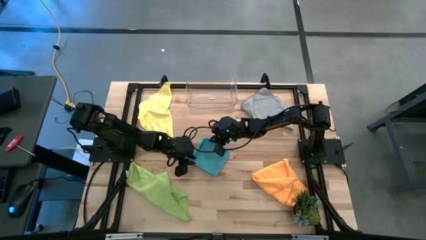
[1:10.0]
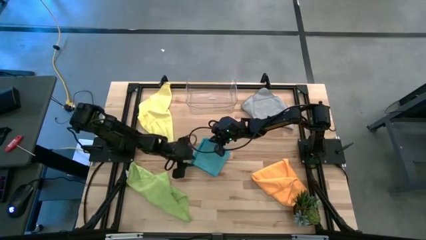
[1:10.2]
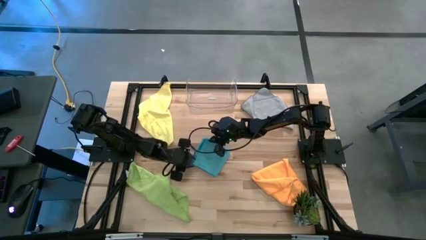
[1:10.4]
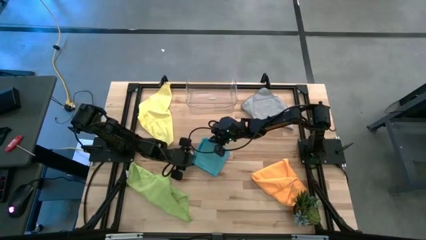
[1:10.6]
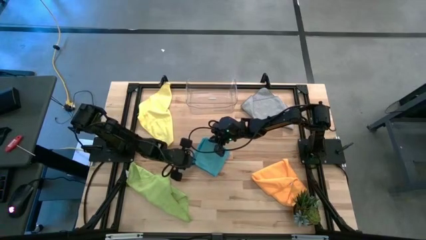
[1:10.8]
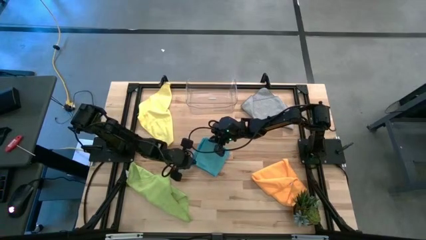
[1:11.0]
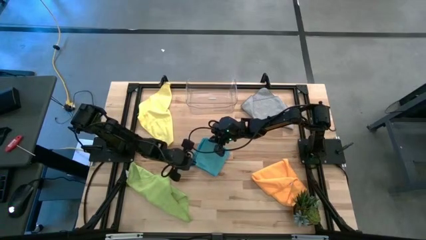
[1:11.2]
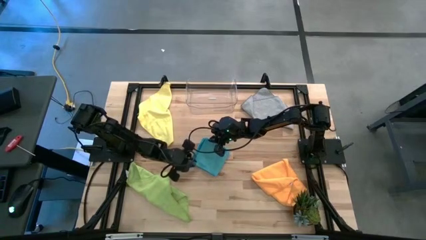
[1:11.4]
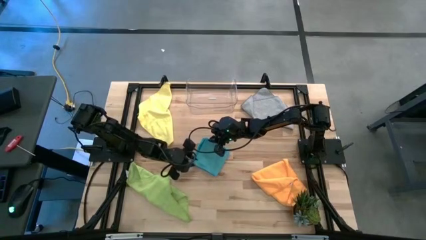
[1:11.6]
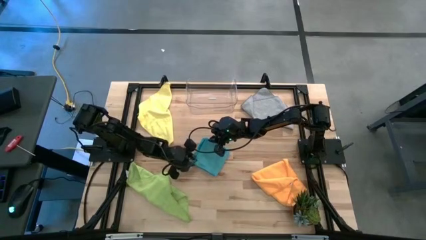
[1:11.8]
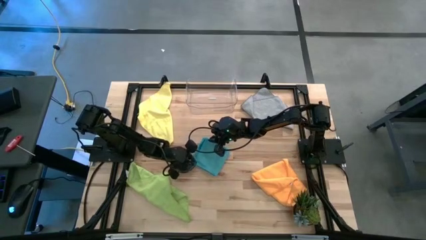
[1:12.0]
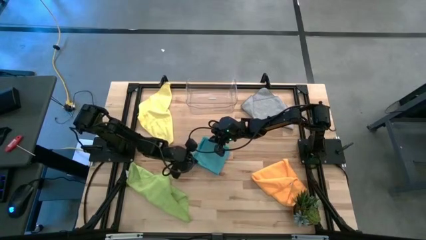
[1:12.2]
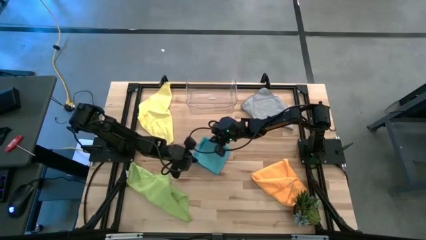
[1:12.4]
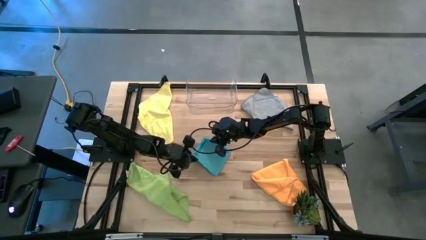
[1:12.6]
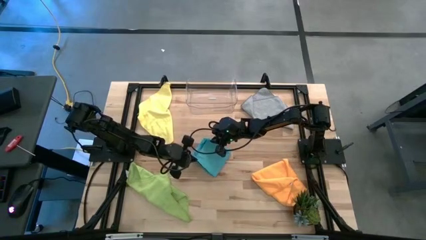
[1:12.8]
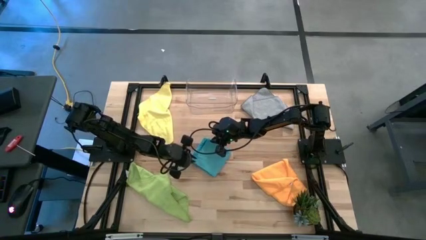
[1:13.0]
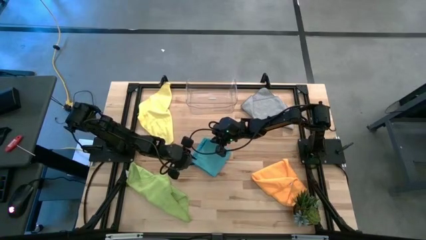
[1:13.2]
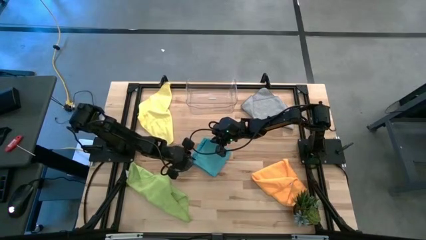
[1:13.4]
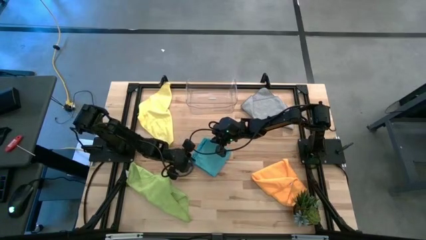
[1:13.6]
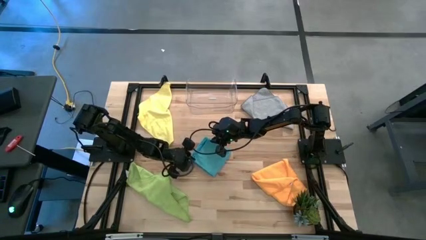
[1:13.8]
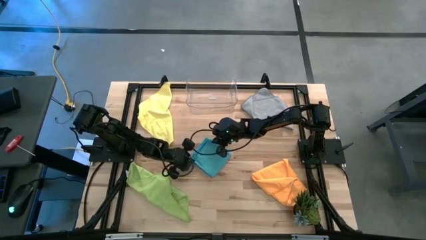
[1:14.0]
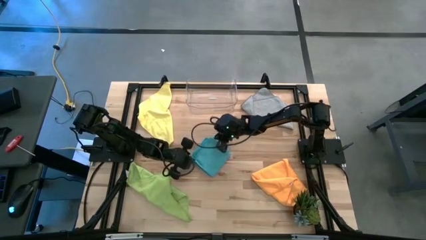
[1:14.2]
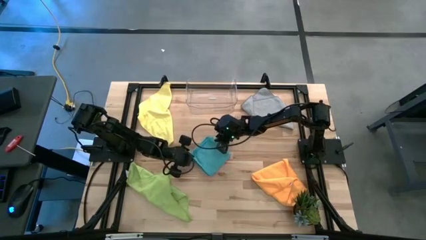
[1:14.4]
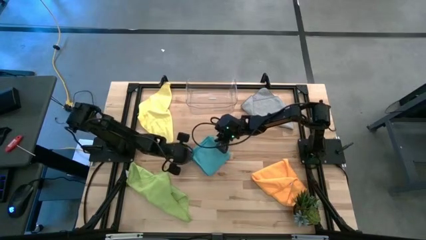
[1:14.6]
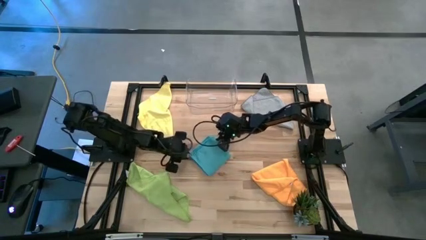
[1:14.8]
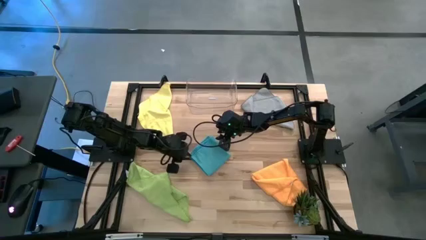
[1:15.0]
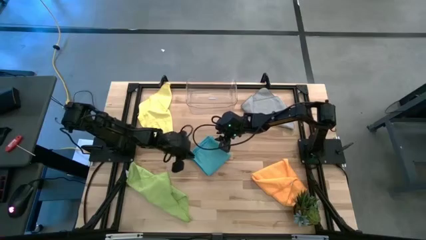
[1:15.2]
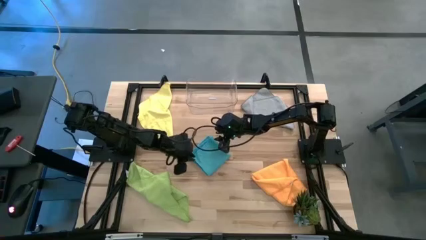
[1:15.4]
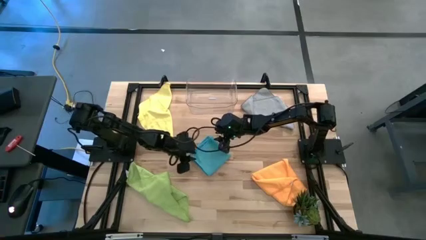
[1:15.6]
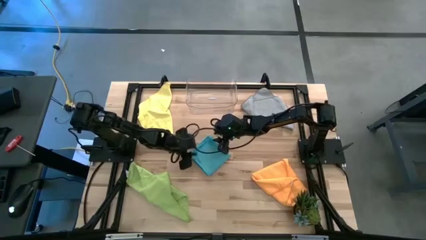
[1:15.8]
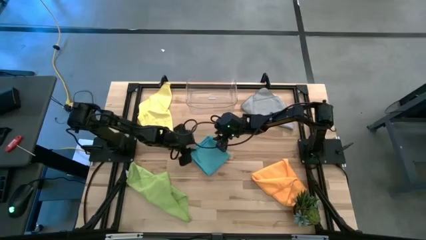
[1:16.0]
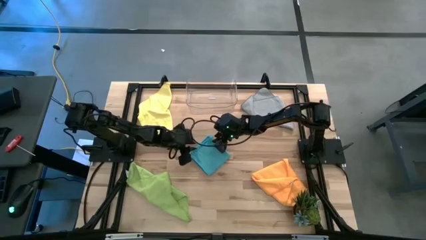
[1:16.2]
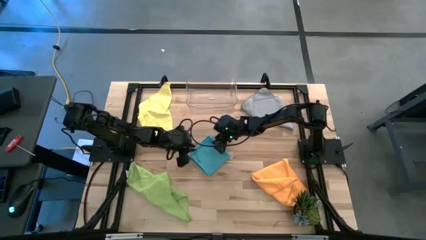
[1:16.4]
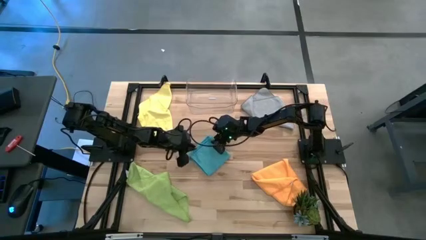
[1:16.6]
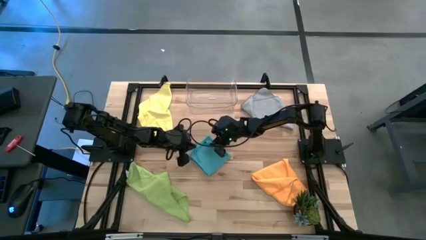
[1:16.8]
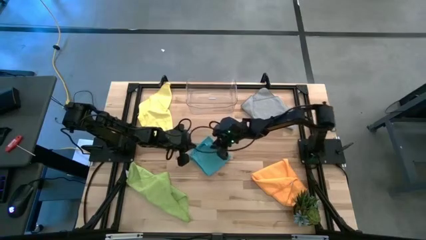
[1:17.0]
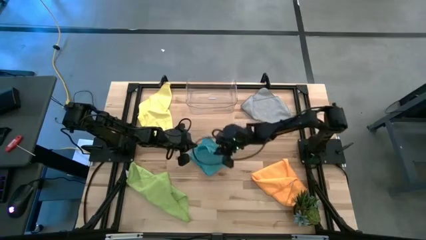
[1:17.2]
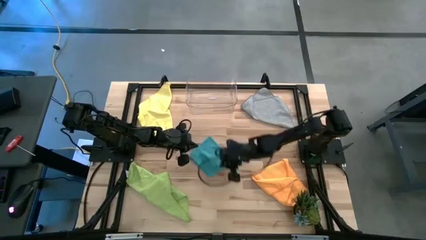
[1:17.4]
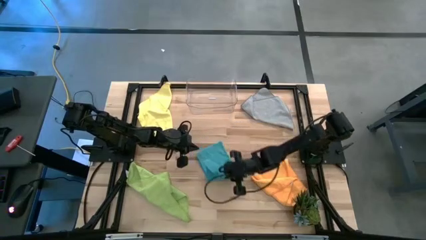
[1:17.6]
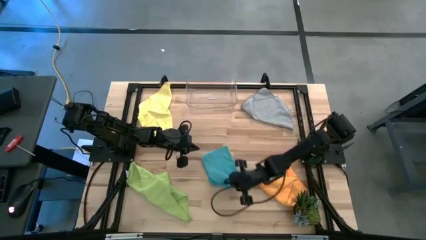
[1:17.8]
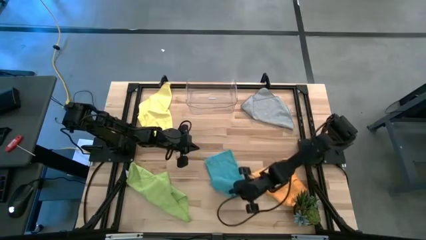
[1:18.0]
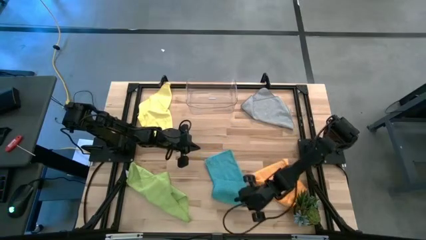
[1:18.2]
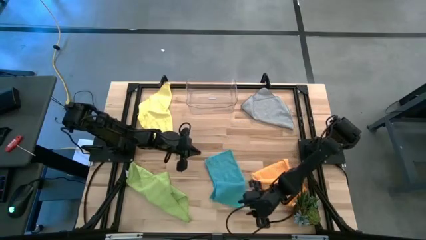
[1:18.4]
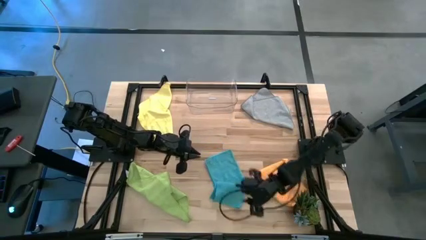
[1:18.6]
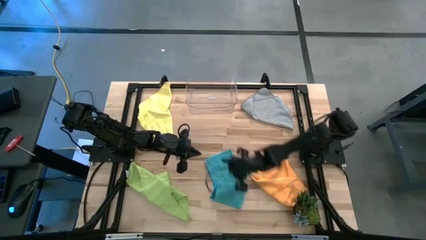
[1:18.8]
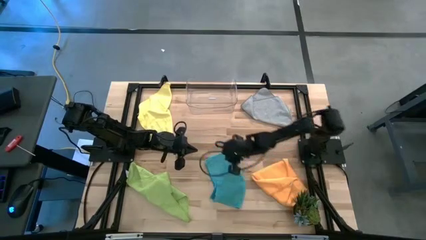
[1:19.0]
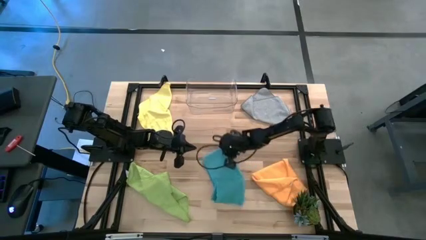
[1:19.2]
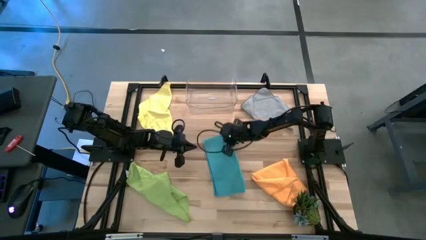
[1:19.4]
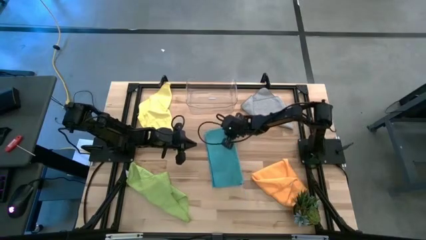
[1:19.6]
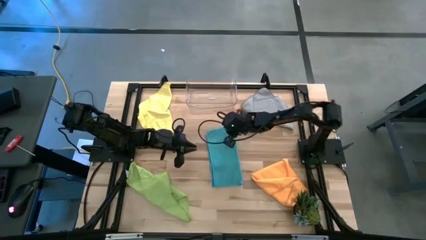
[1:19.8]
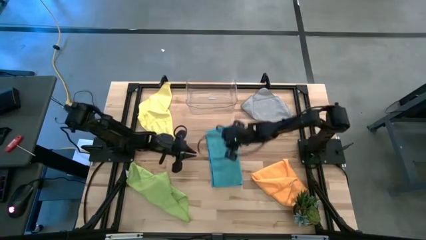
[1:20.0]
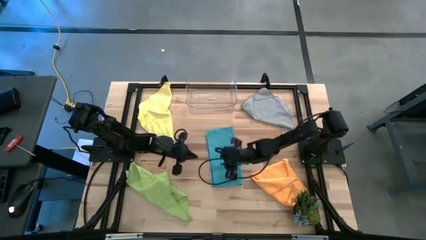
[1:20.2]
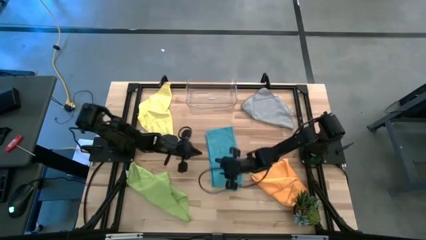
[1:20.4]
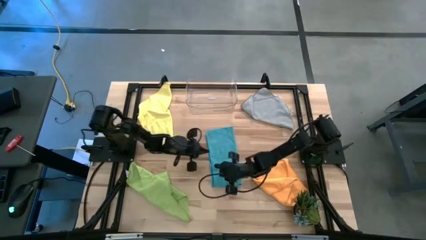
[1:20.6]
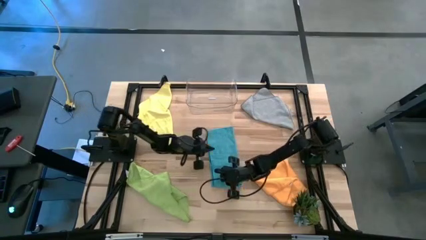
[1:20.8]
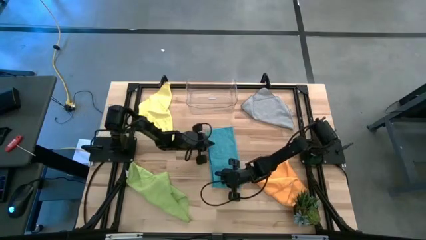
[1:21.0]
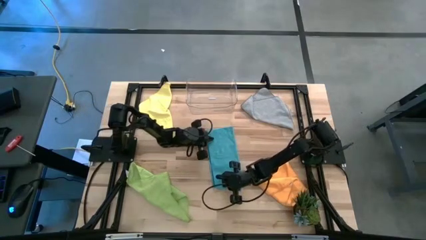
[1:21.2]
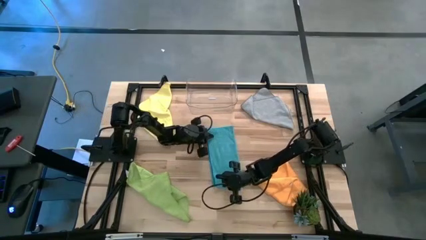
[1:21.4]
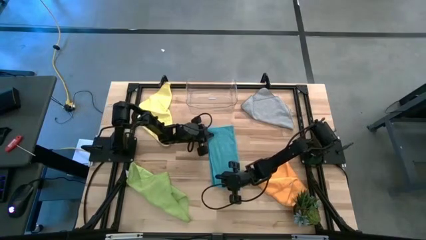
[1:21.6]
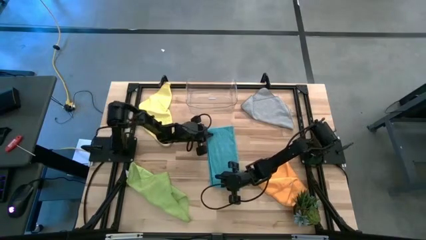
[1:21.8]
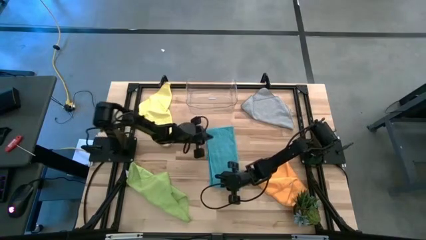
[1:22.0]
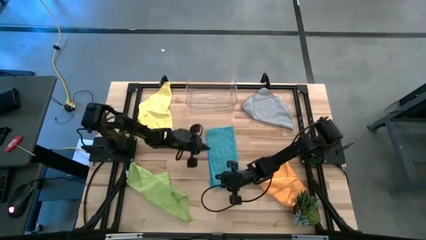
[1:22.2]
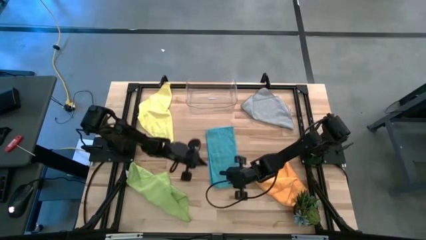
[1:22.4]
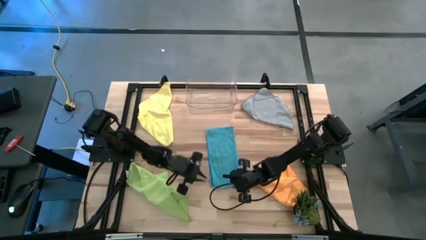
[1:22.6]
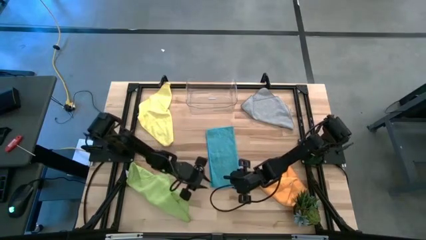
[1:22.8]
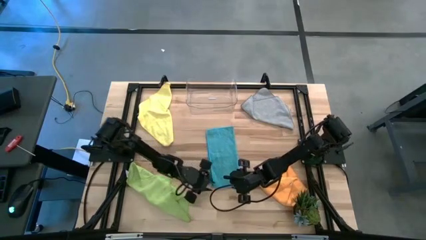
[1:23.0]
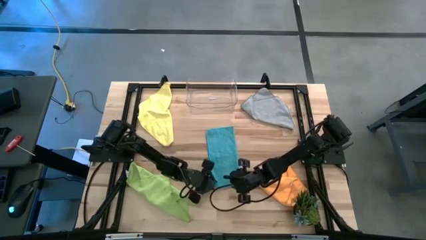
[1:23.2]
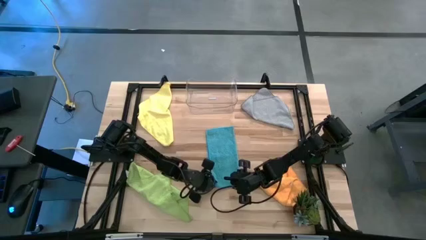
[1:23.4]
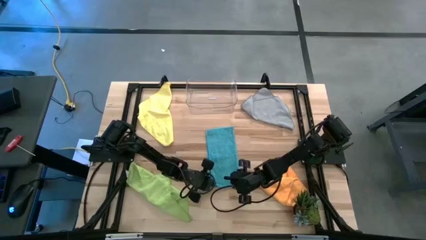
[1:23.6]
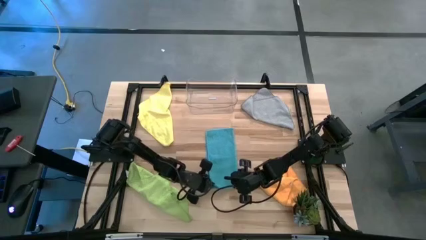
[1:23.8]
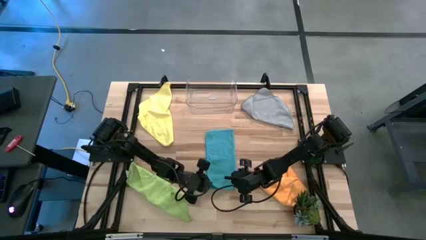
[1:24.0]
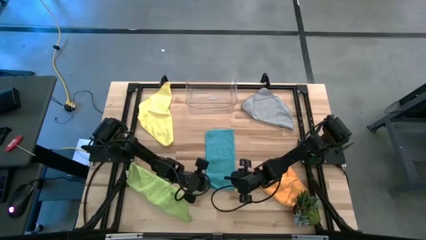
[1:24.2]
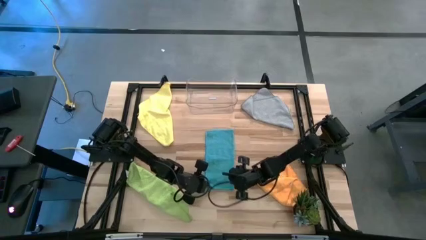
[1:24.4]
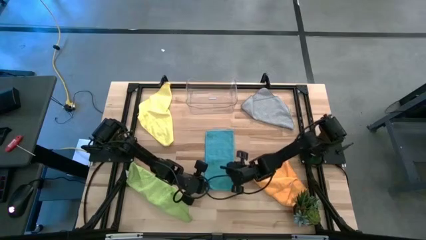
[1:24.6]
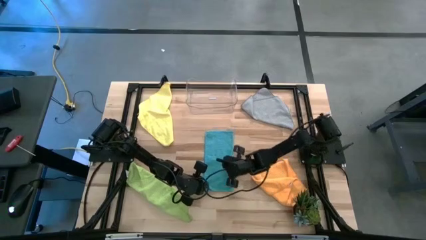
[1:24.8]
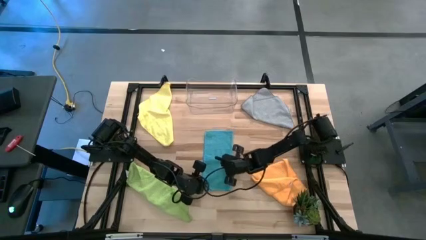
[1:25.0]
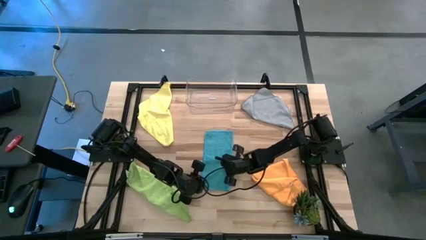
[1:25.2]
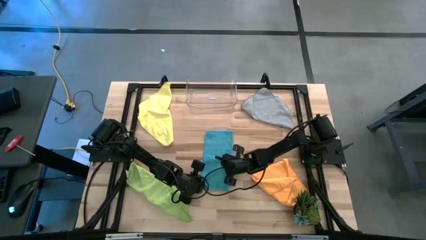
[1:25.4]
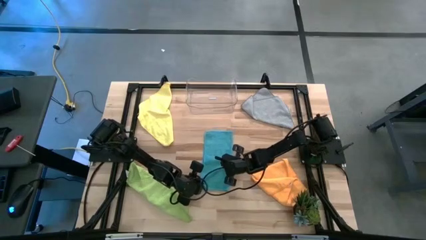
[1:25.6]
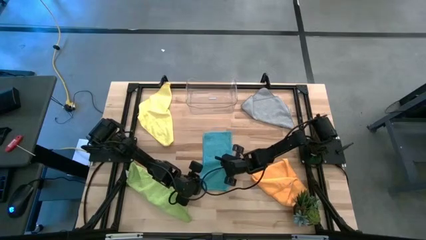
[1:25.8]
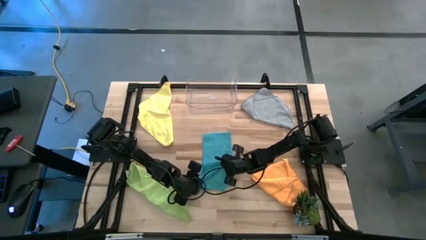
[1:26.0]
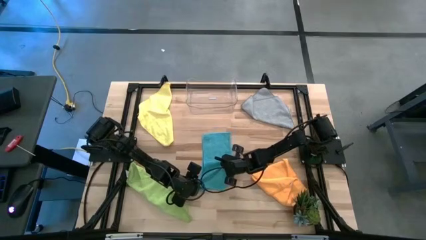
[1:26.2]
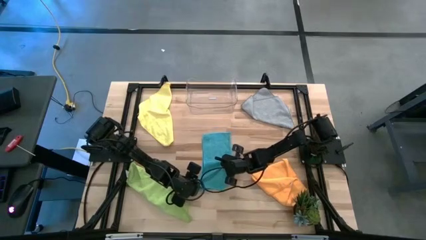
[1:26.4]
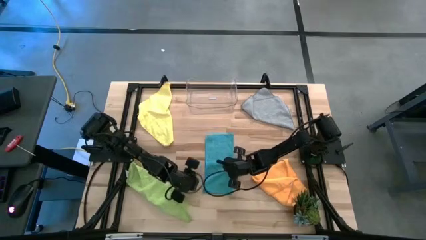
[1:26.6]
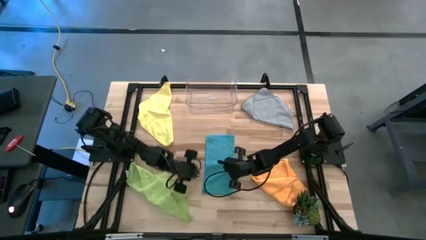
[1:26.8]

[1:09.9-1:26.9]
Task: Fold microfiber towels
Fold the blue towel
